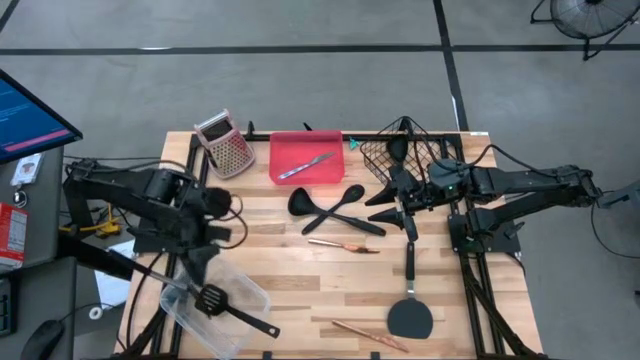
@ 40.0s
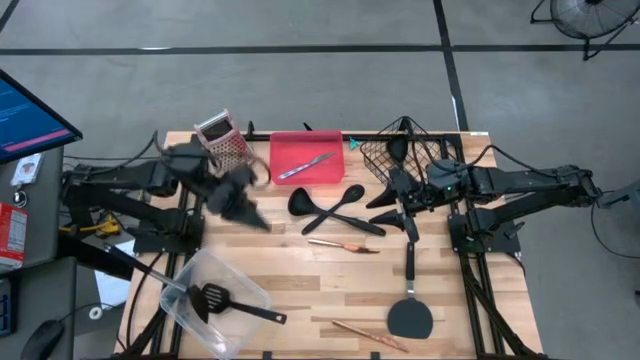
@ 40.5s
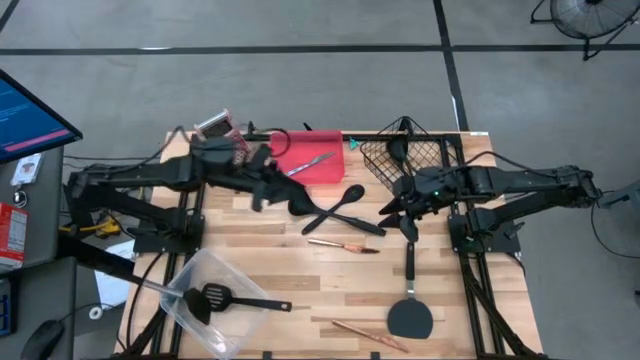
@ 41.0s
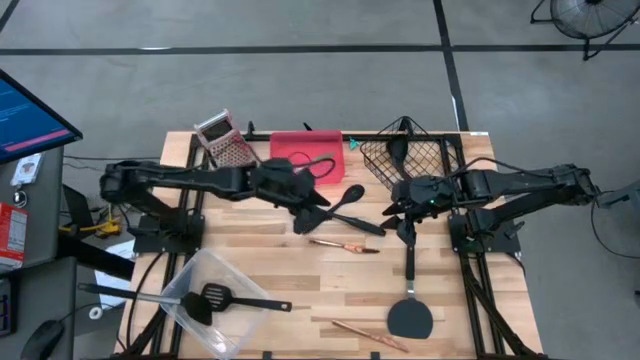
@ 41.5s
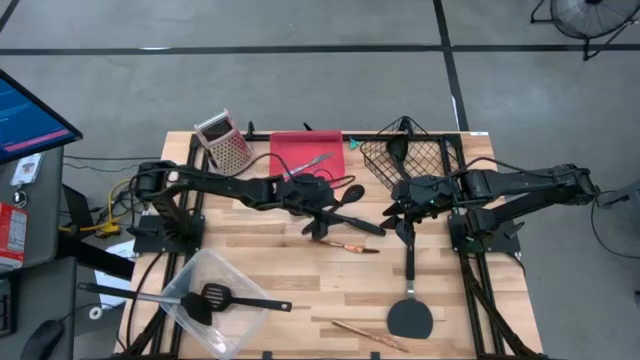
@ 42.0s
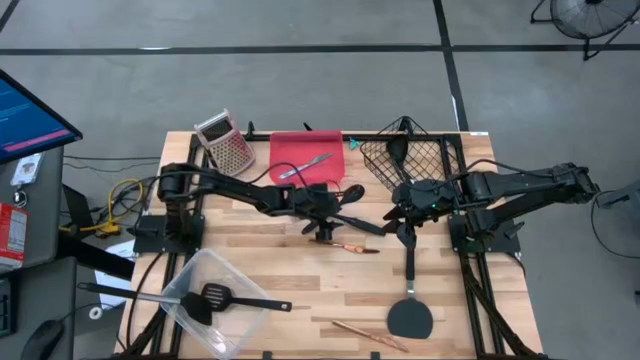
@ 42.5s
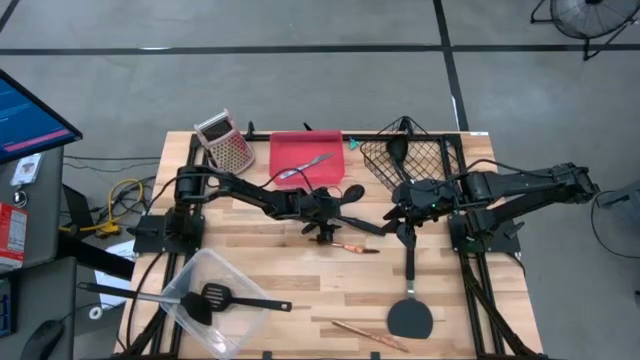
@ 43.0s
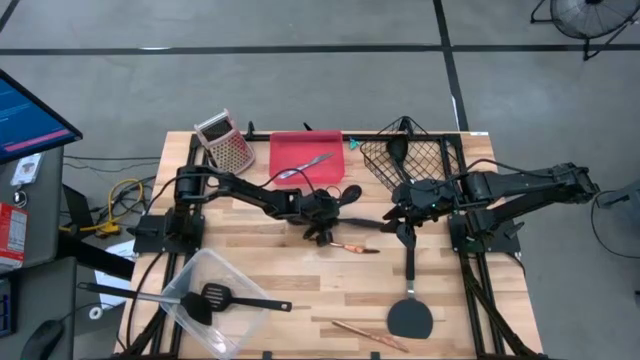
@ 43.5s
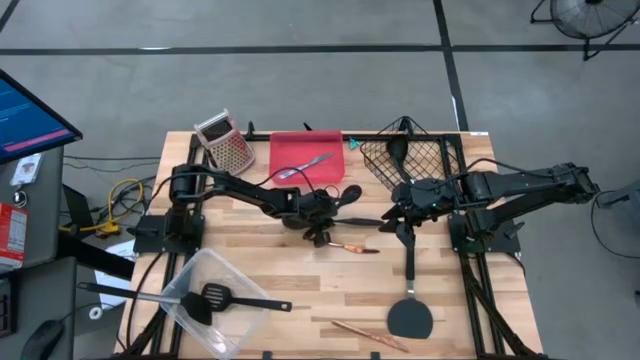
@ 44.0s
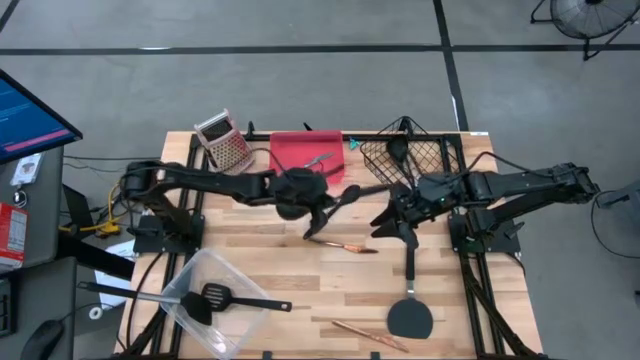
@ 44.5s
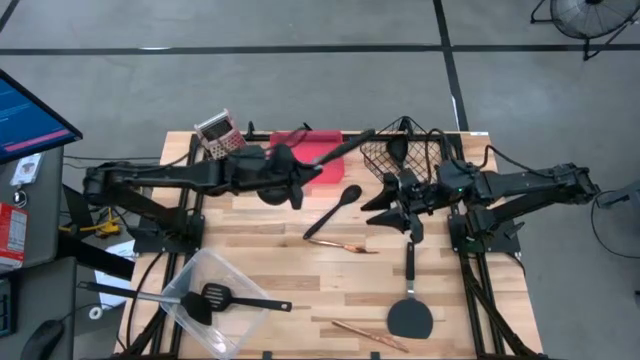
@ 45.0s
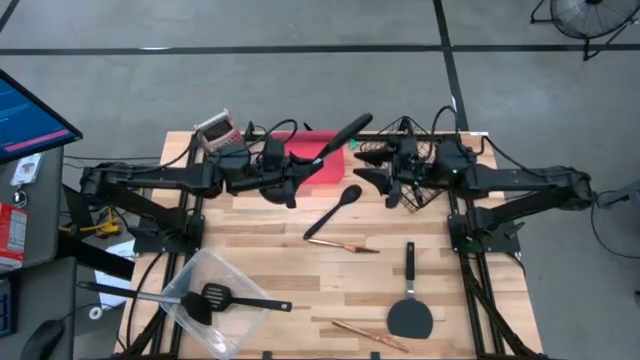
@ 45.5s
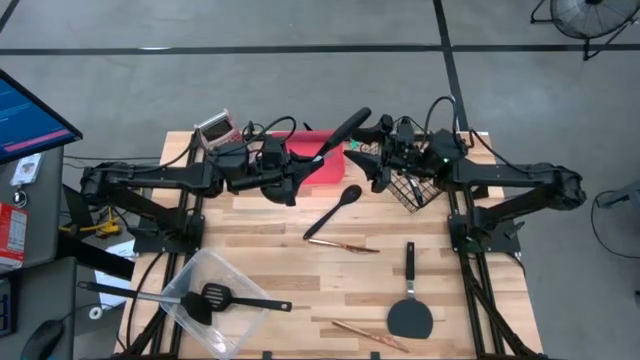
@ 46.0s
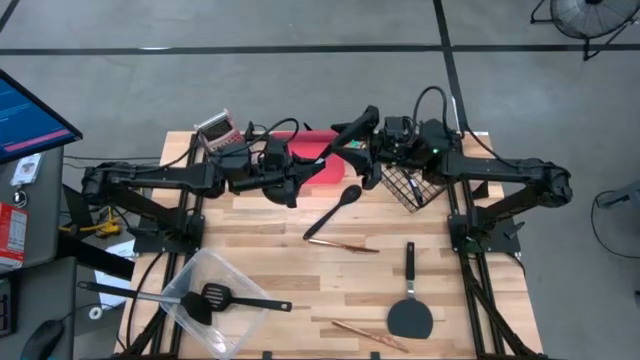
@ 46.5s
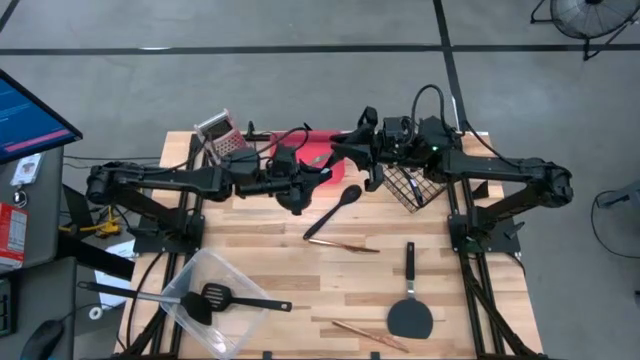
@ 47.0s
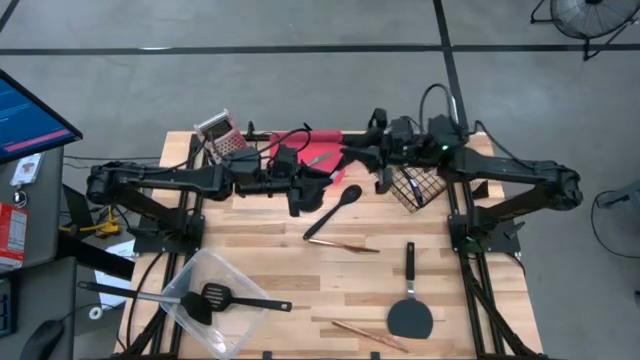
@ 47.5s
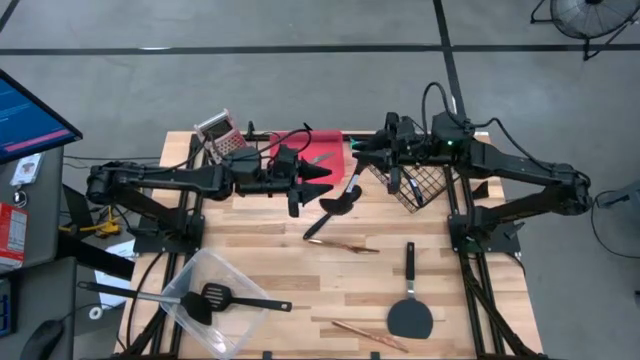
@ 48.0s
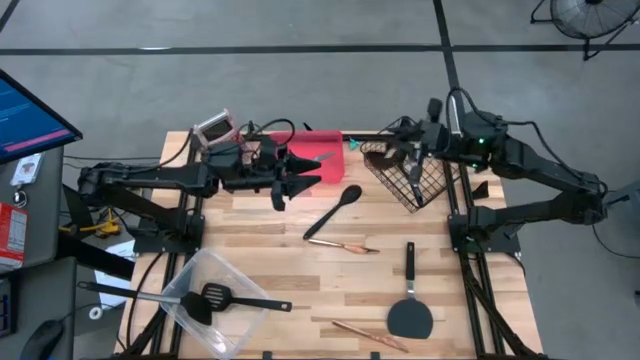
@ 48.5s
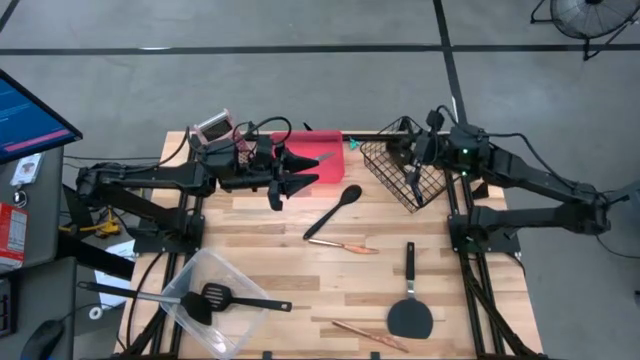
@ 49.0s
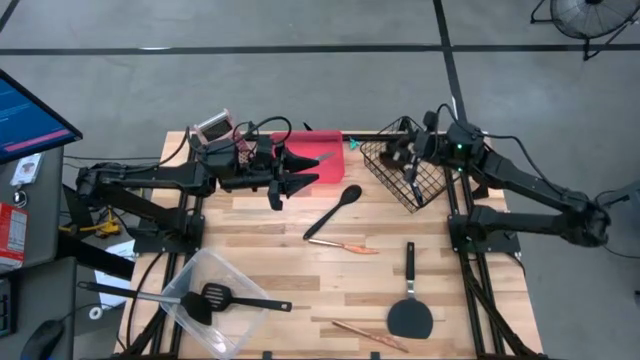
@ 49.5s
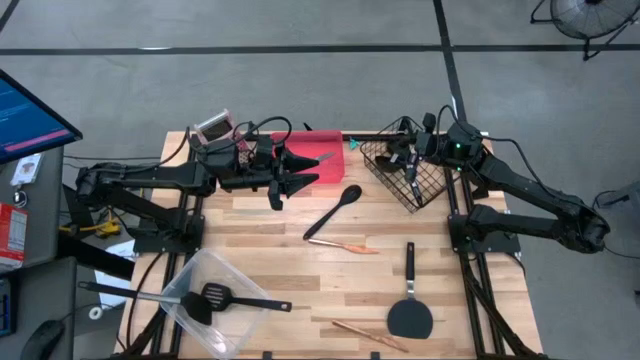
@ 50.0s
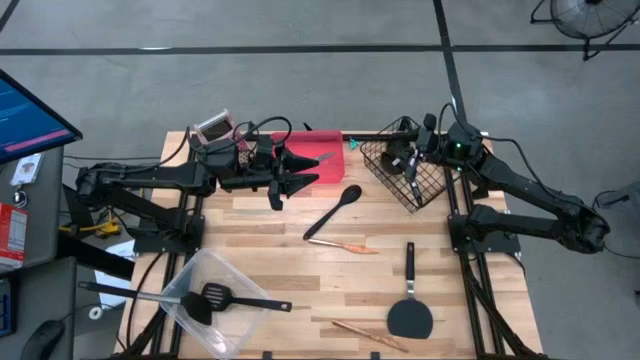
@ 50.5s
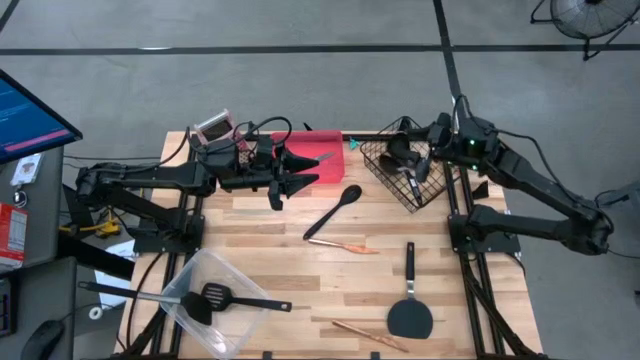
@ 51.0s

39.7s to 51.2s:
Task: Pick & Place Kitchen Items
Put the black ladle into the wire basket

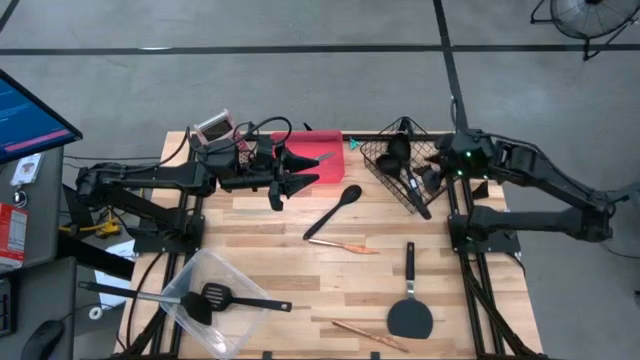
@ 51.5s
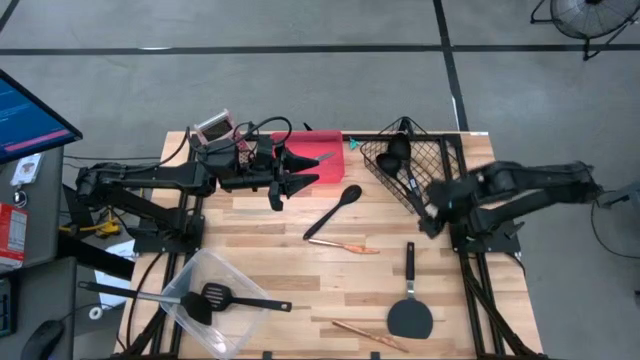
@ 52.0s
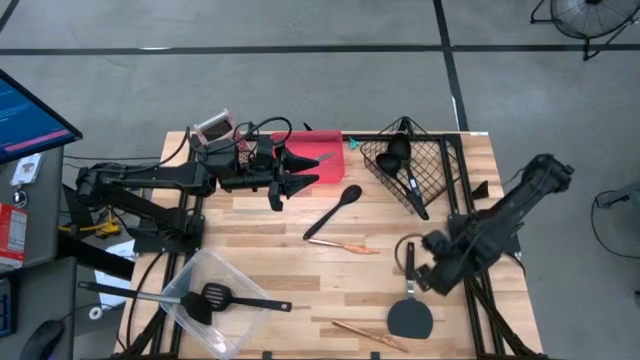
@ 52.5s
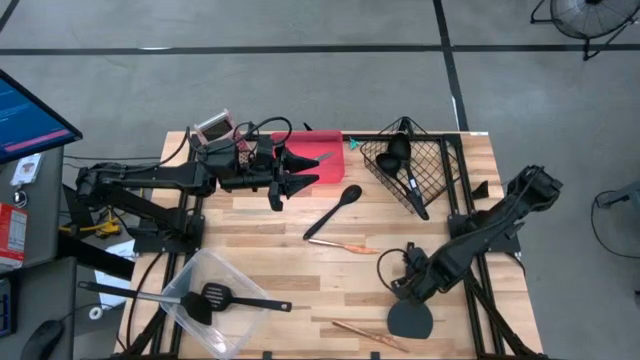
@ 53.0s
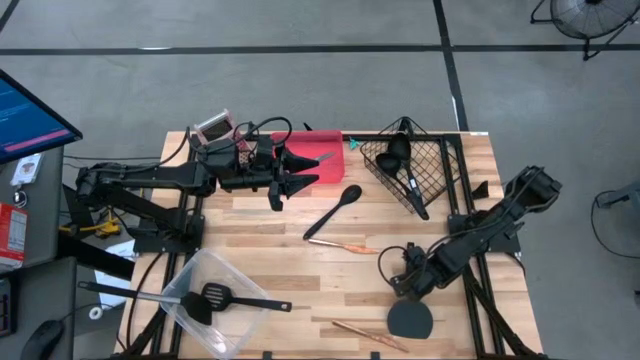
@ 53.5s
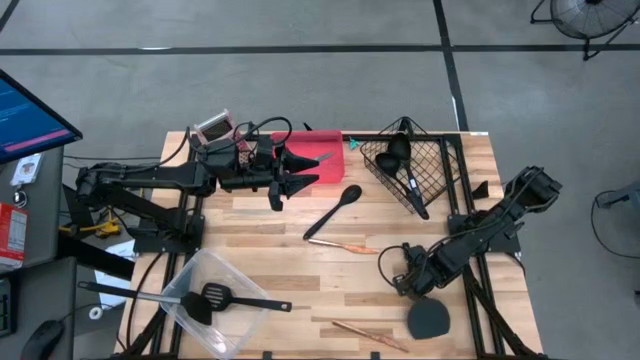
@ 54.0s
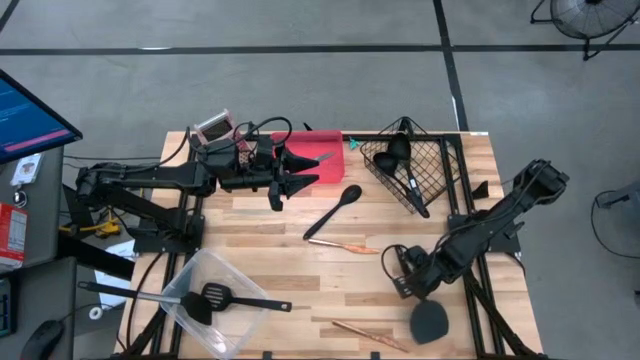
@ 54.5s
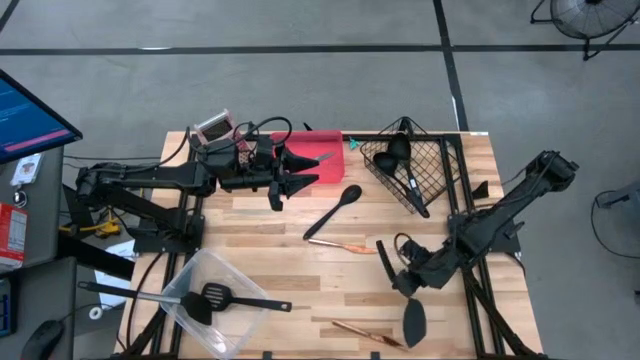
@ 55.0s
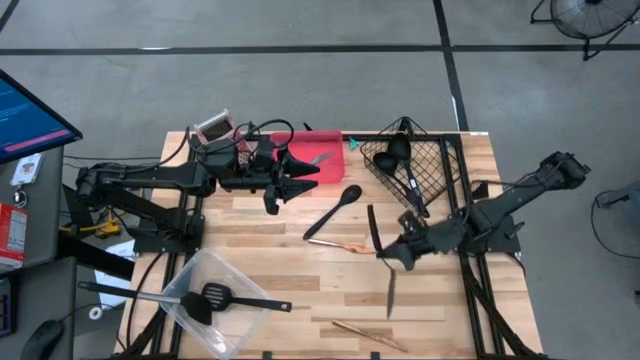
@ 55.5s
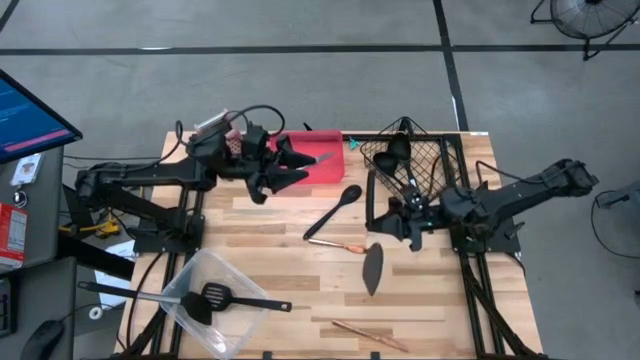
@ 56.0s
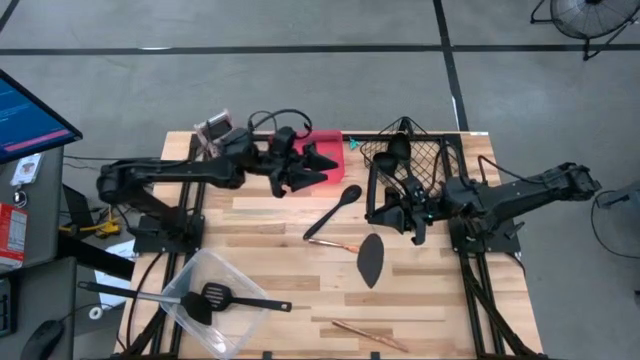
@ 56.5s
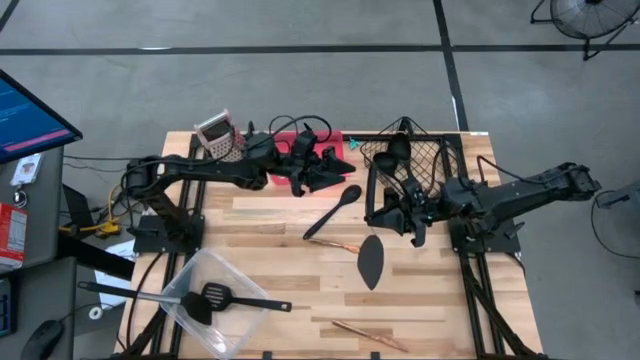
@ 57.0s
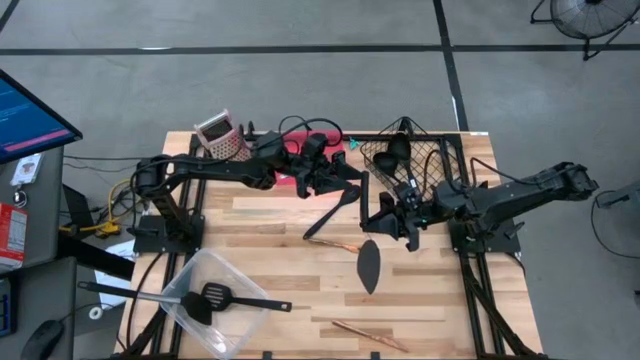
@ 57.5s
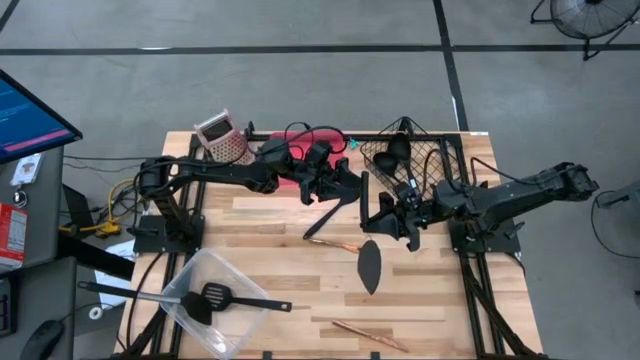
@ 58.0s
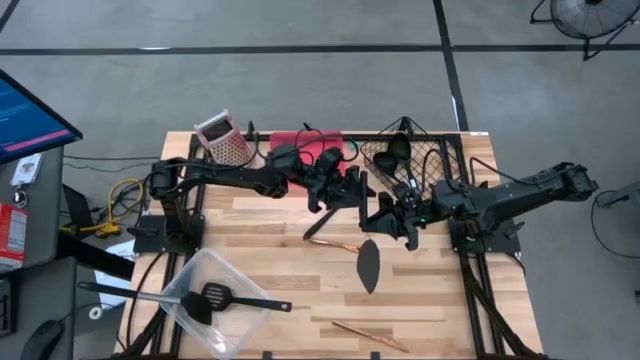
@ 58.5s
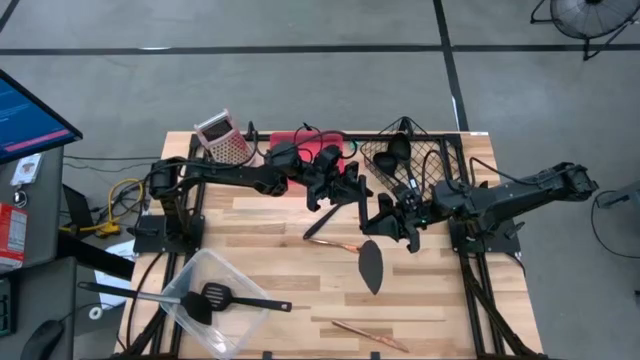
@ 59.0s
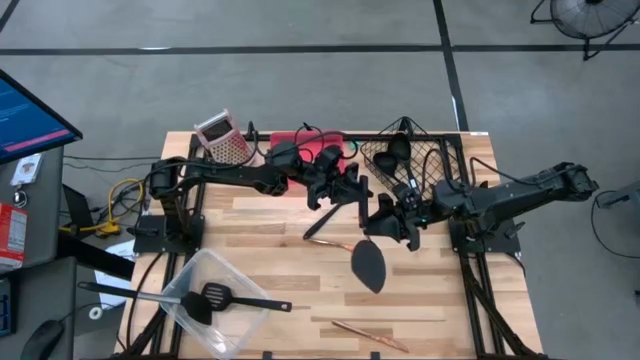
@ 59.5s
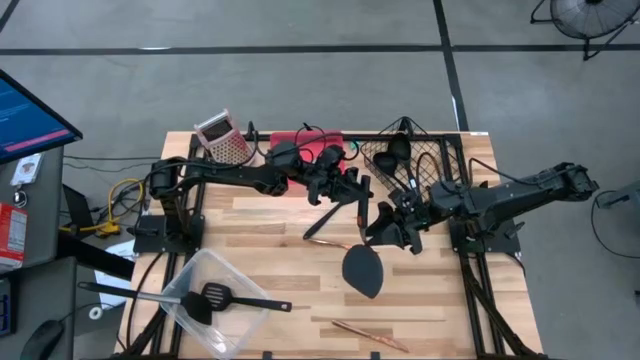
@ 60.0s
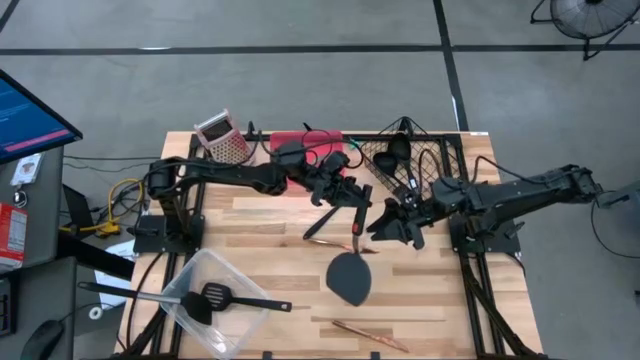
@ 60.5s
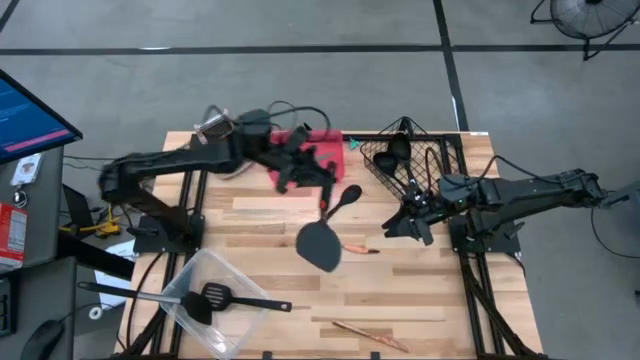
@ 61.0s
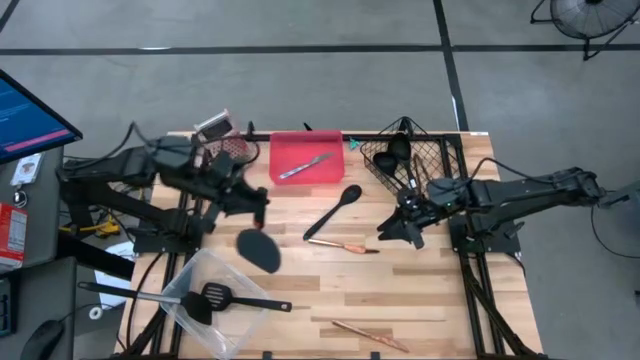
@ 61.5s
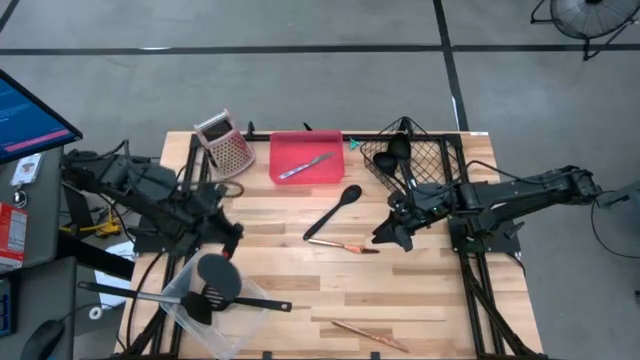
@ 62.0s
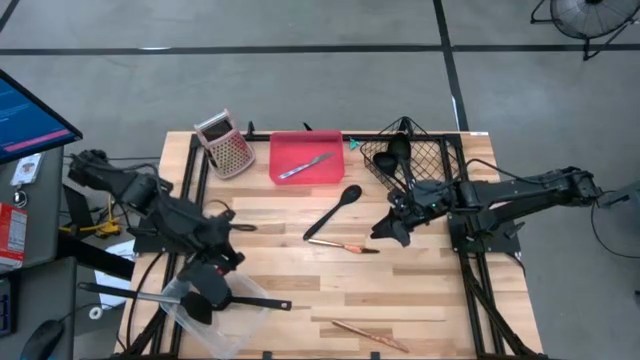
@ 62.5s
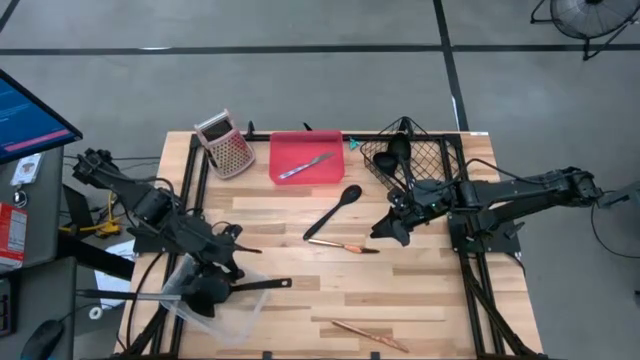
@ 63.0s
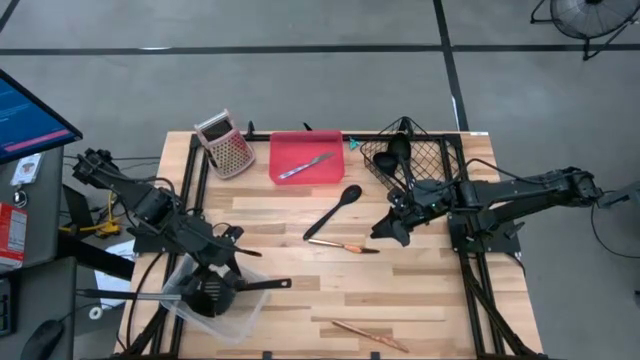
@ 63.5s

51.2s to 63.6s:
Put the black spatula into the transparent bin
